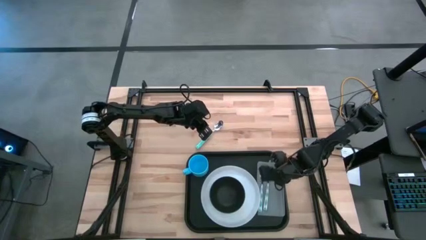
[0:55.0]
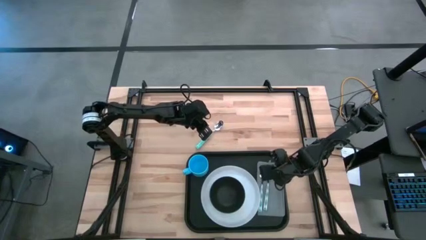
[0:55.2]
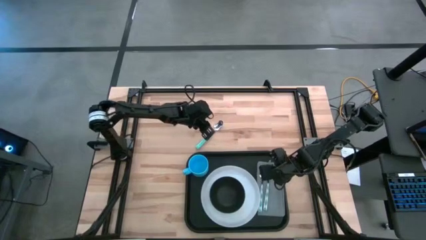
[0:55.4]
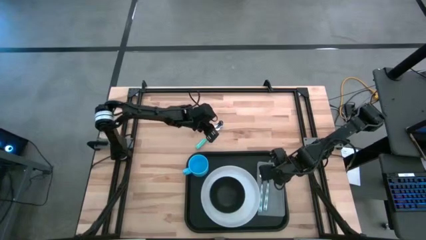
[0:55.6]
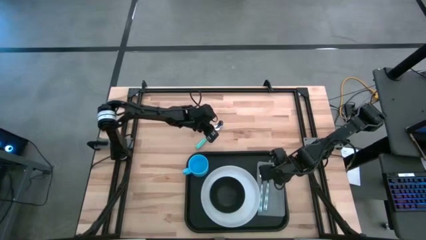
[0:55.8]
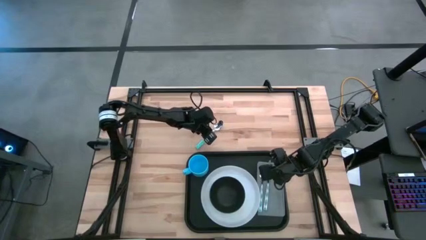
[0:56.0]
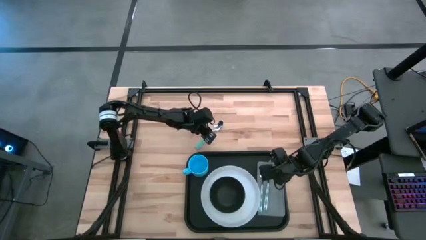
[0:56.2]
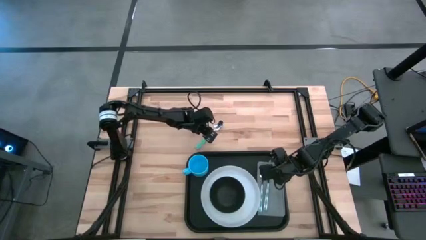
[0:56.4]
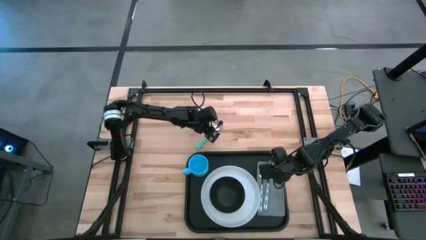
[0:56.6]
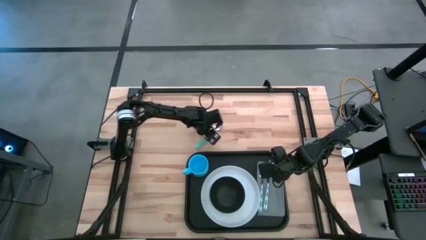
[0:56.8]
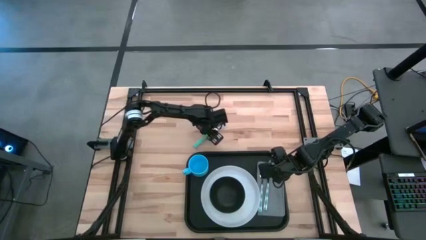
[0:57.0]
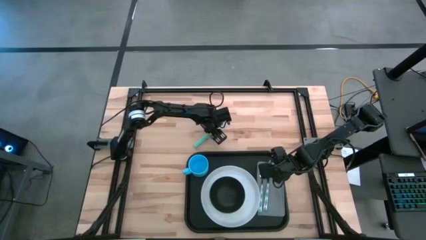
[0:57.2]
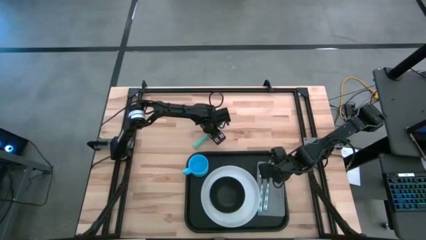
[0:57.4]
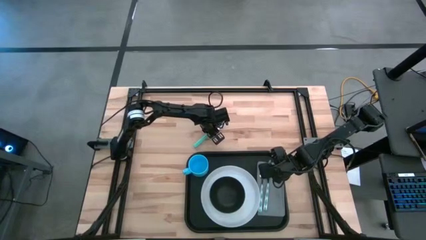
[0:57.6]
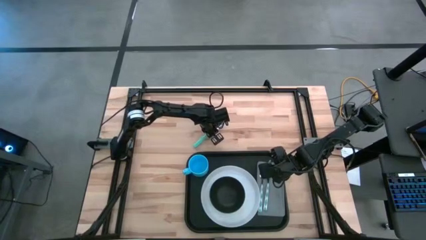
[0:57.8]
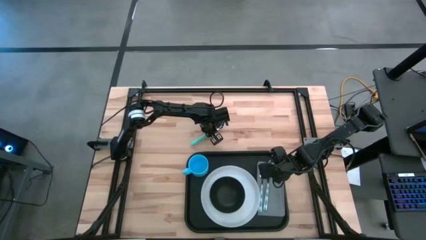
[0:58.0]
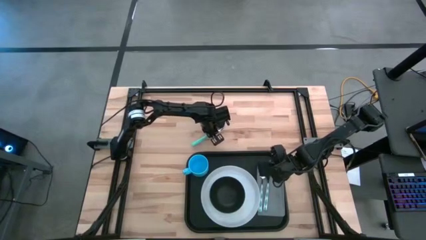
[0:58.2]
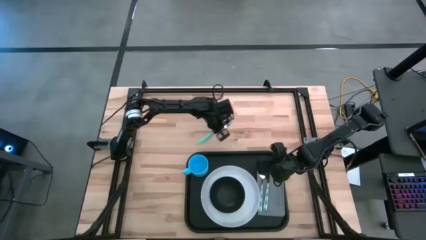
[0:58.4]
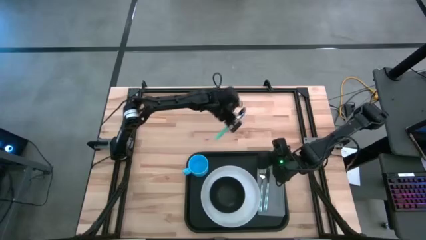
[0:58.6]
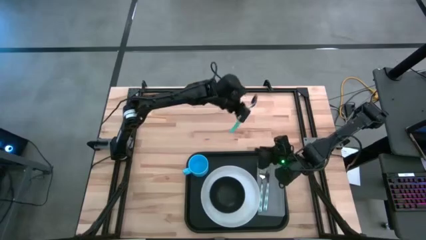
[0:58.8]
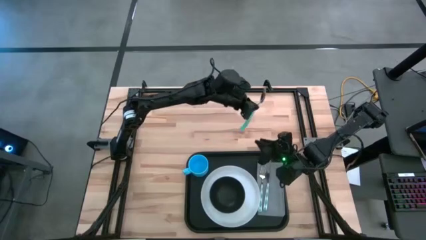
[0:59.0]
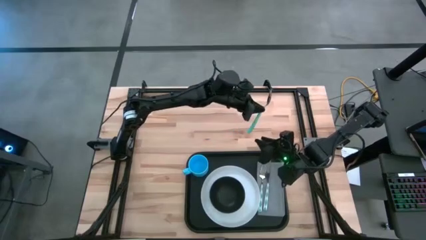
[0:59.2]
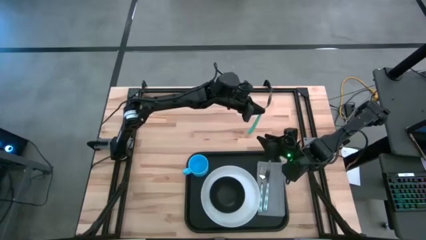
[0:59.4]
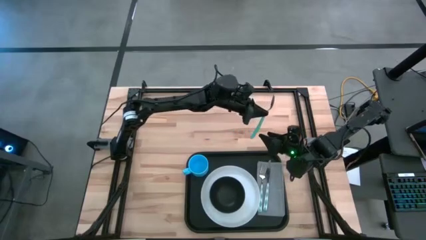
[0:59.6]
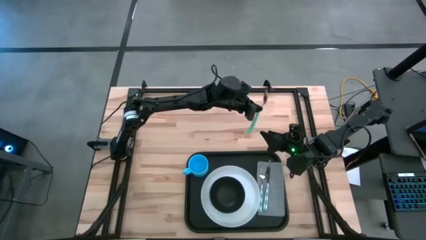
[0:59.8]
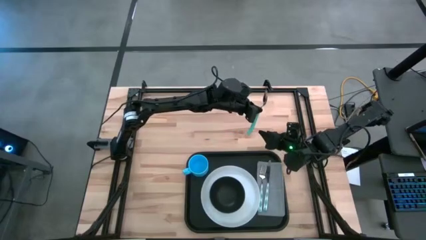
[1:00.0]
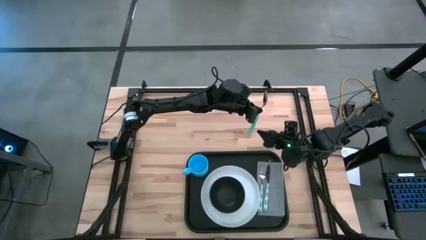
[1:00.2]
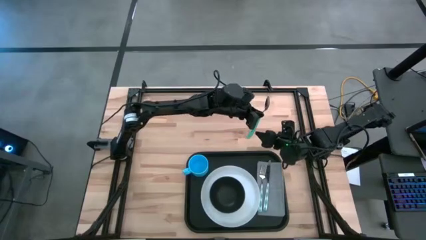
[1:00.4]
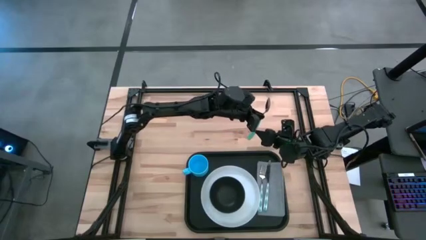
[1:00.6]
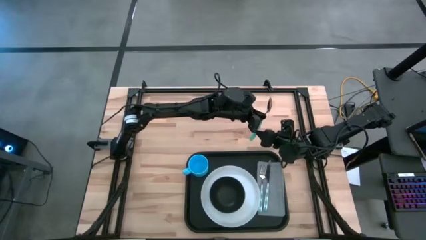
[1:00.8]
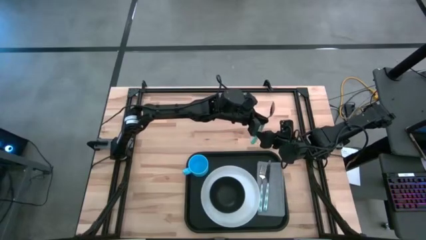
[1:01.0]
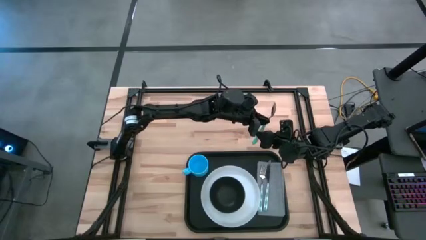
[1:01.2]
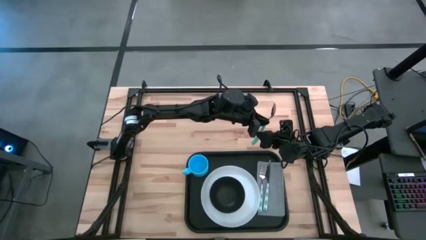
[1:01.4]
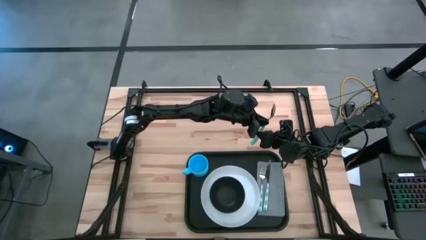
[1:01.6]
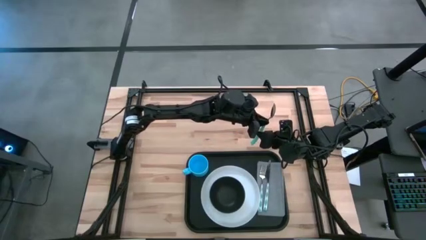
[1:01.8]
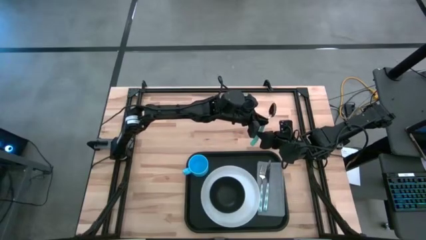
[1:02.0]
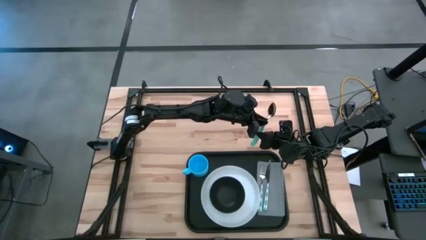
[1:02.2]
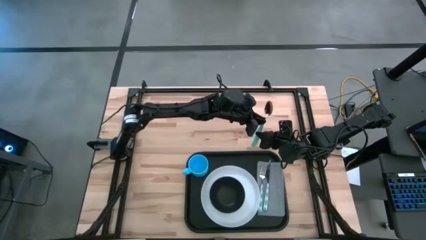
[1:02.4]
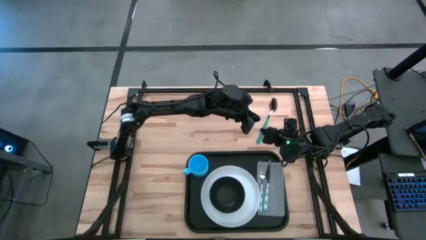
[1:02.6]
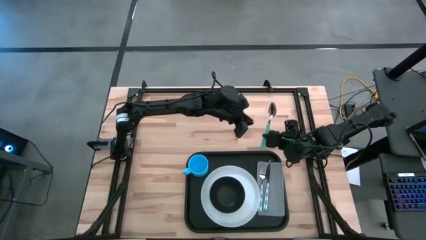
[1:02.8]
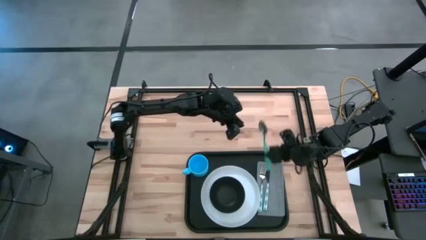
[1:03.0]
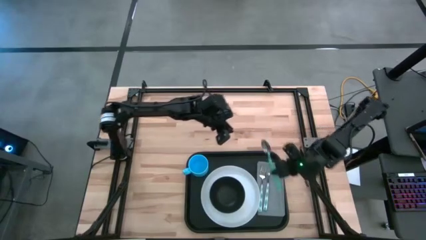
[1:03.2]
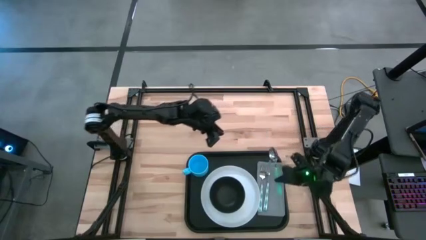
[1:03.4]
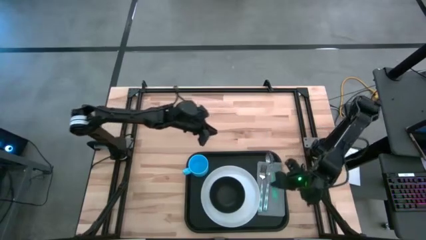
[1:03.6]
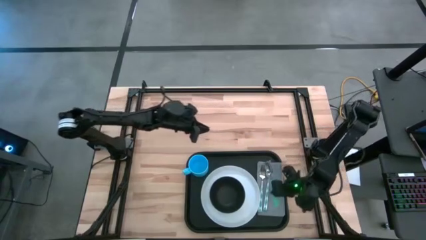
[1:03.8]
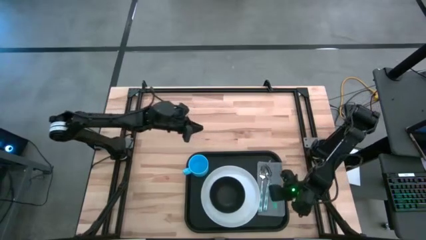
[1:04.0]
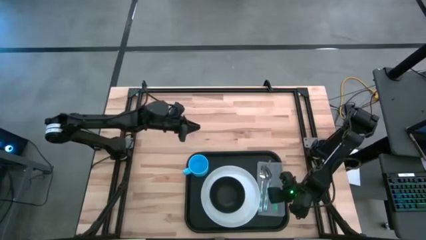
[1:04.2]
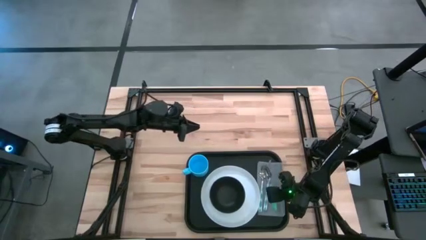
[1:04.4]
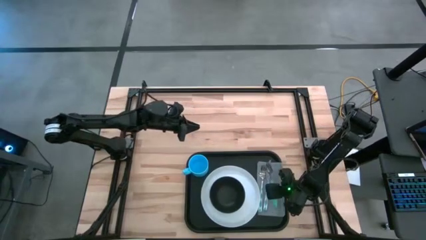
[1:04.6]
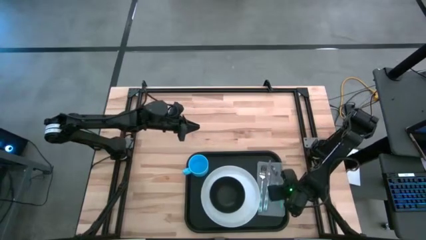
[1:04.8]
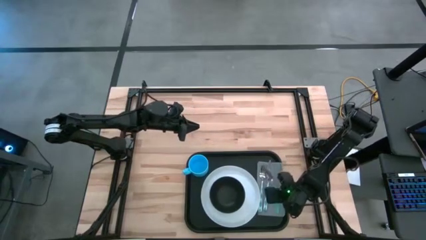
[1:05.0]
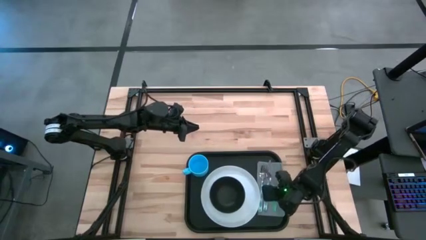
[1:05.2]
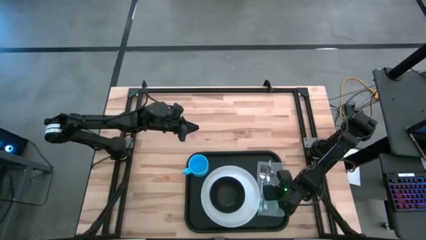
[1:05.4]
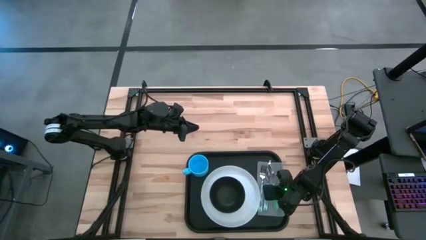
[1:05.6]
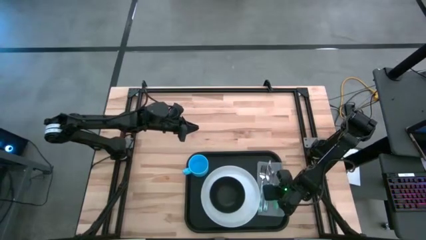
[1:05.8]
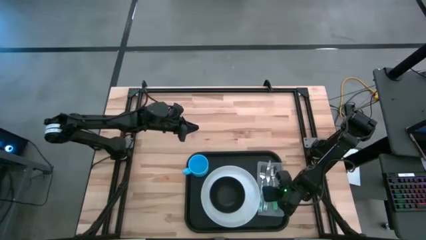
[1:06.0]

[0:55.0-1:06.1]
Task: Set up tray
Put the blue green spoon on the gray napkin to the right side of the blue green knife

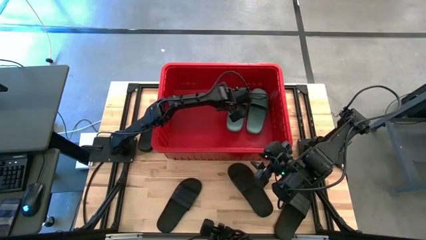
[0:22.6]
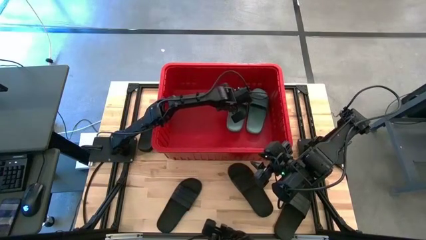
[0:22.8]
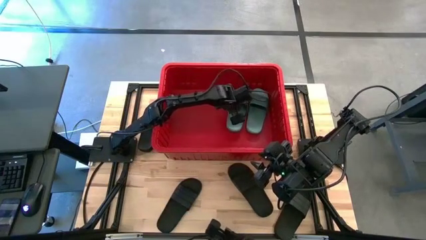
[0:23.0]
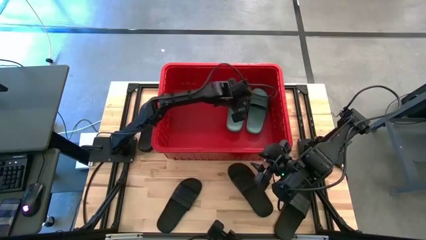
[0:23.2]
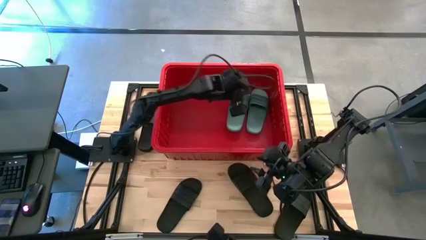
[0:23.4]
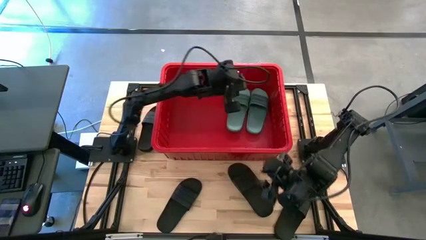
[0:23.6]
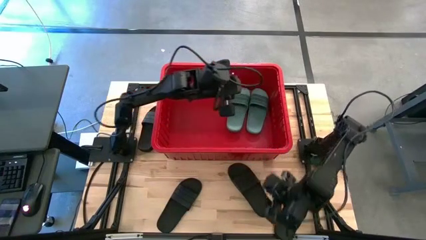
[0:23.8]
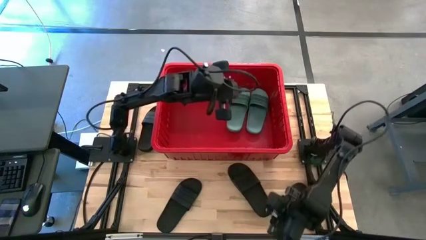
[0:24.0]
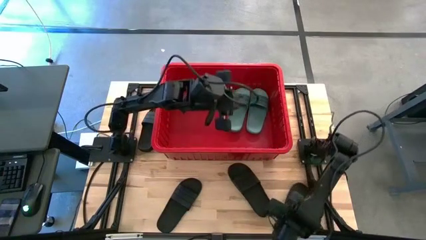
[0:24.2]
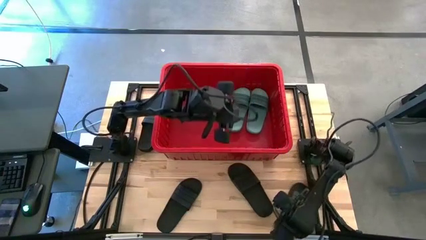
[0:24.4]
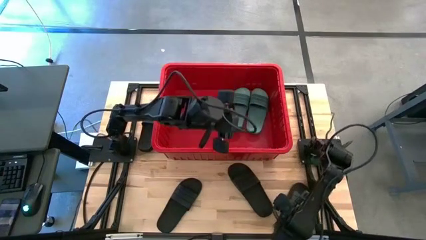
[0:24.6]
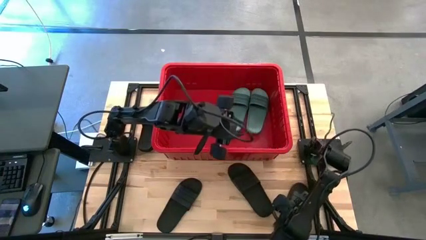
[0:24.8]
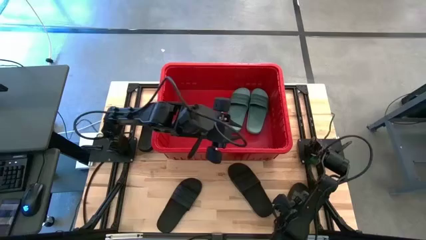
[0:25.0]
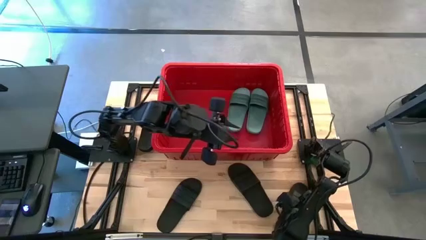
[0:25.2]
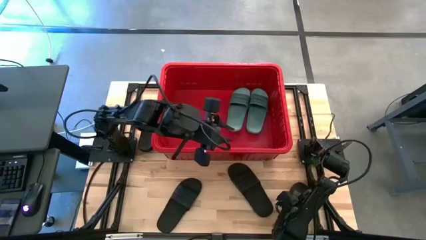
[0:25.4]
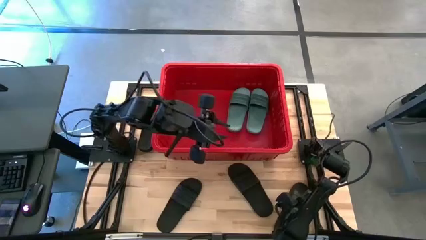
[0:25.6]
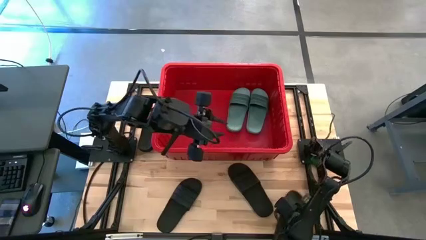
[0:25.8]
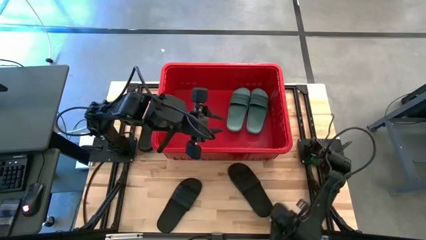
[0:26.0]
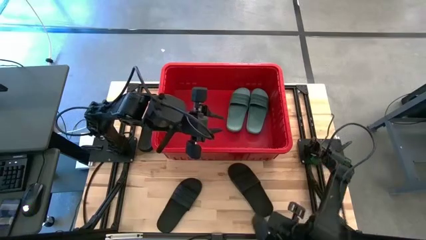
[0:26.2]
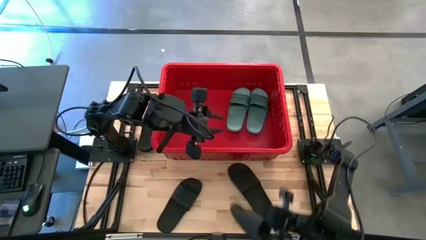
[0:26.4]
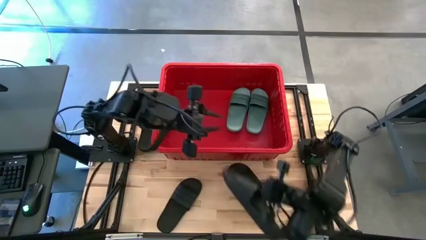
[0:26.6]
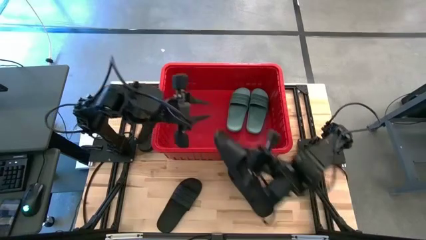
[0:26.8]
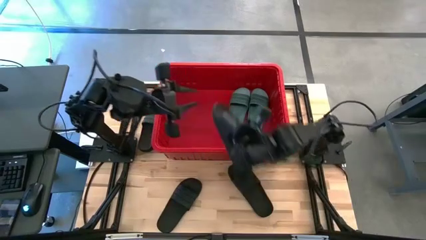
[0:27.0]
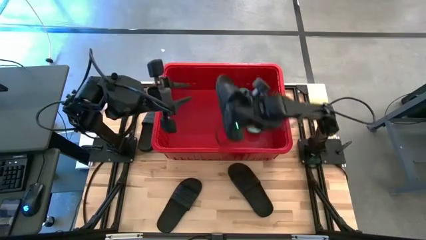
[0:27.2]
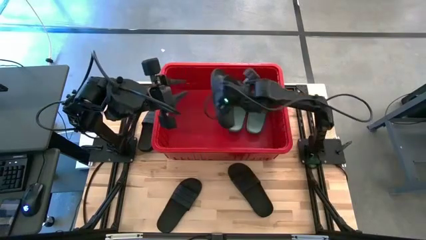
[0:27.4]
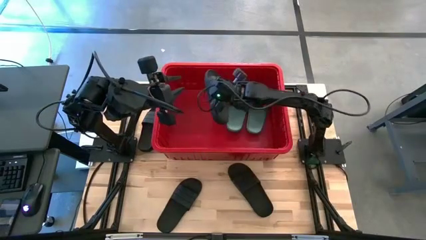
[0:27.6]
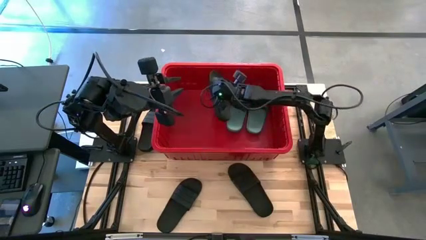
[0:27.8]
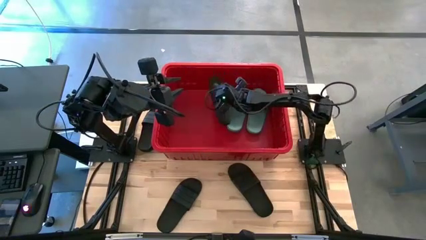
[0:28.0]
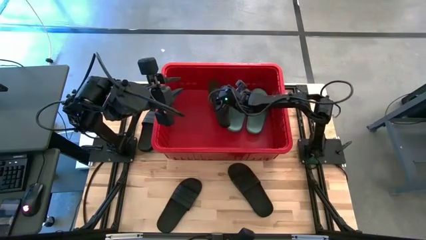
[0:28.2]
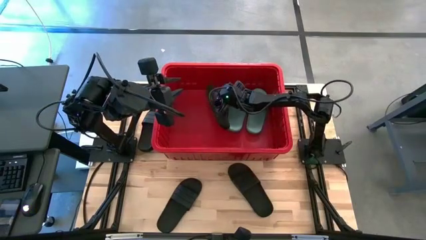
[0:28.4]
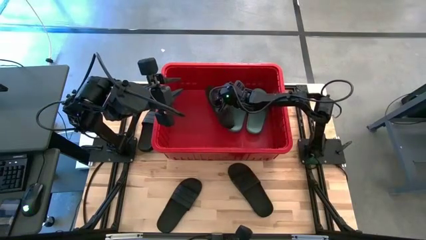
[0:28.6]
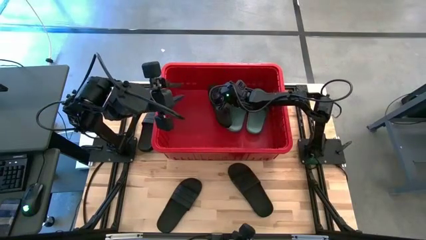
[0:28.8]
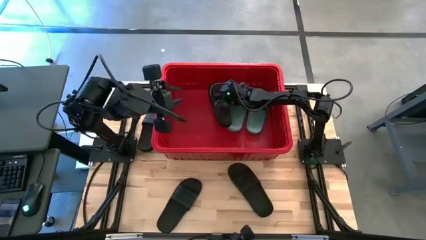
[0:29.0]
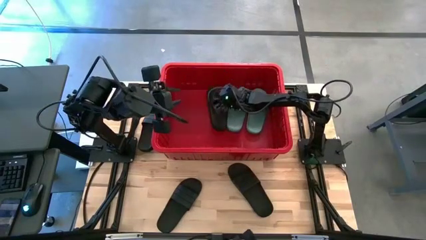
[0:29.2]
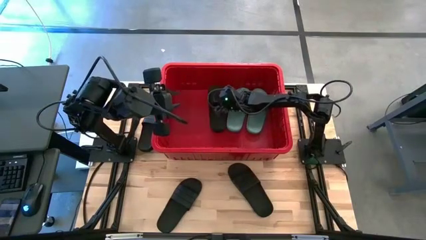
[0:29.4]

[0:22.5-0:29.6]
Task: Pick and place slides into bin
Put the black slide into the red container
